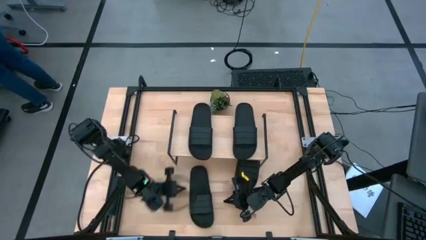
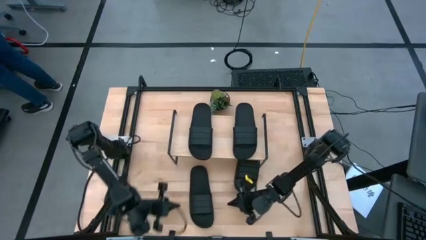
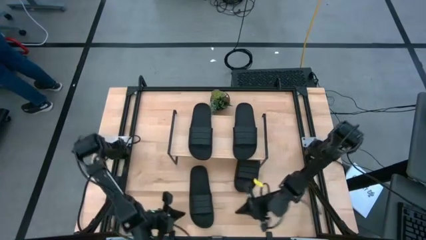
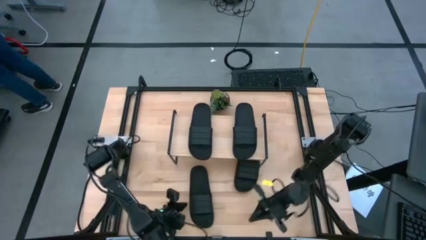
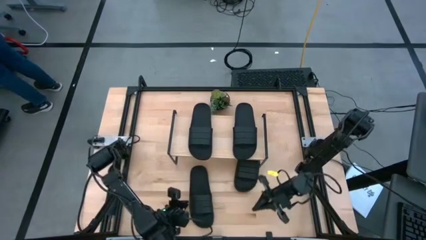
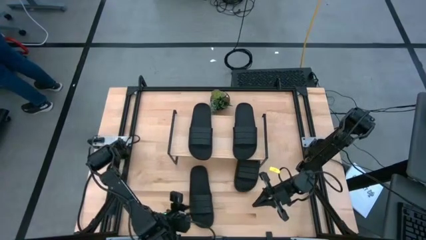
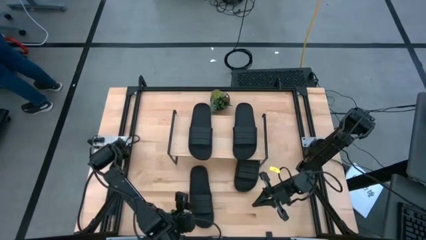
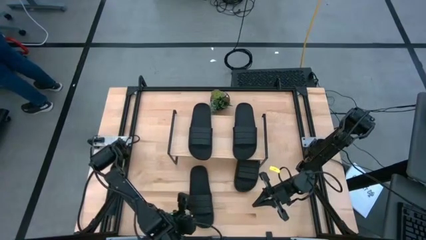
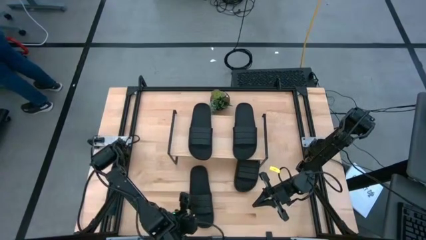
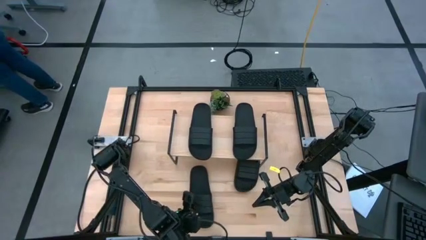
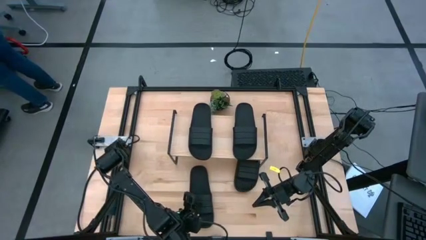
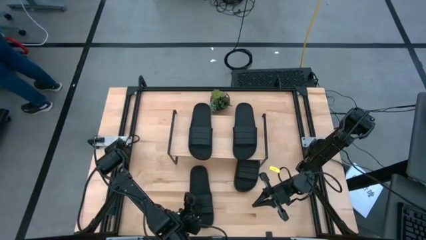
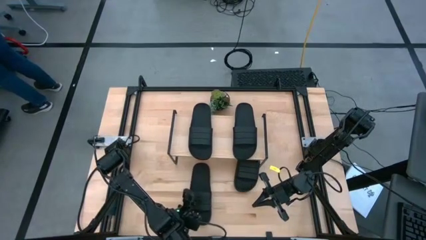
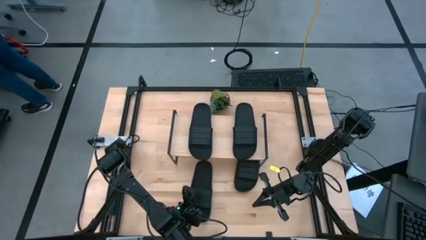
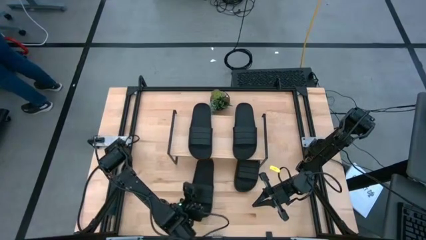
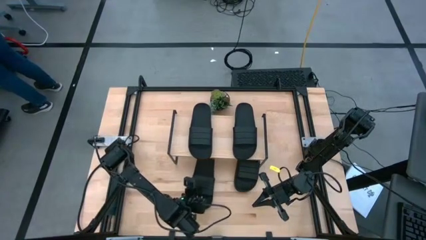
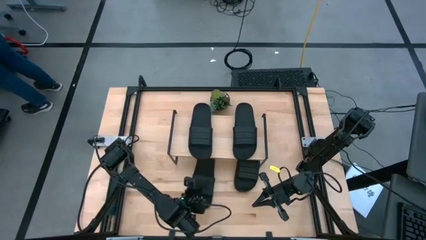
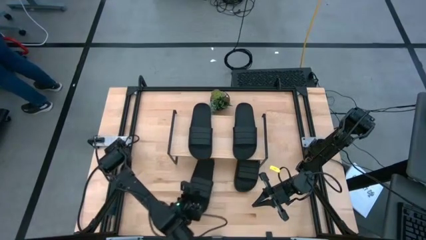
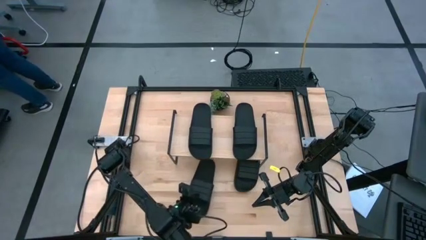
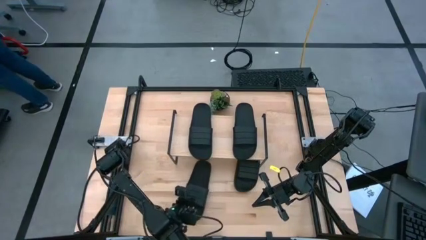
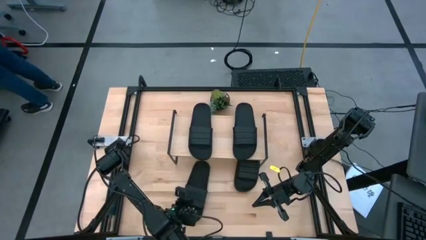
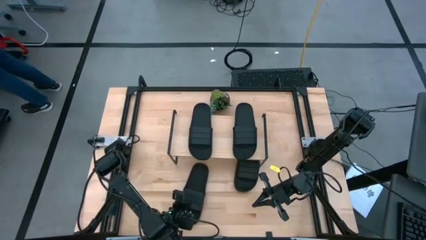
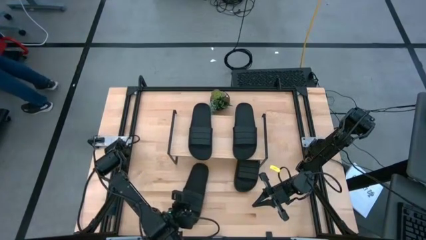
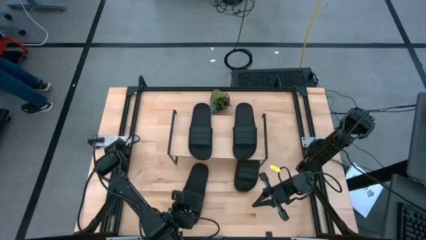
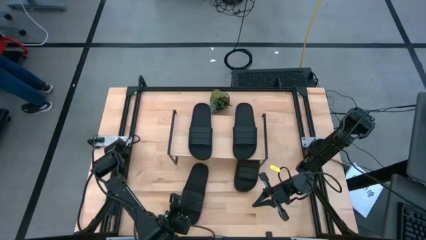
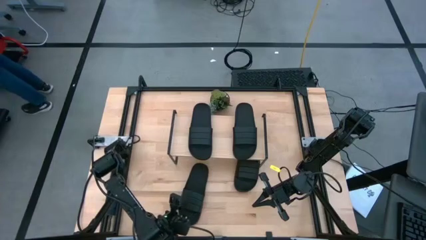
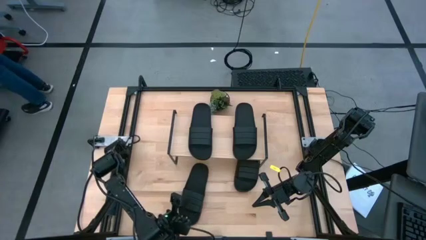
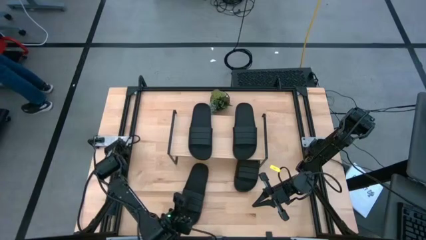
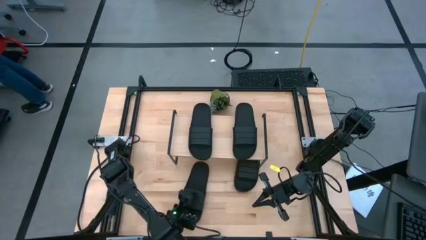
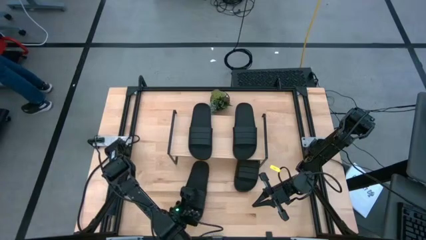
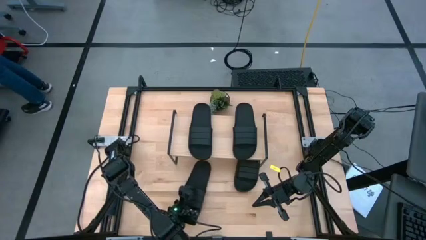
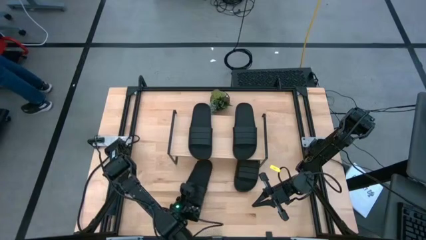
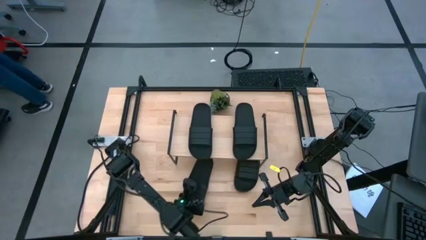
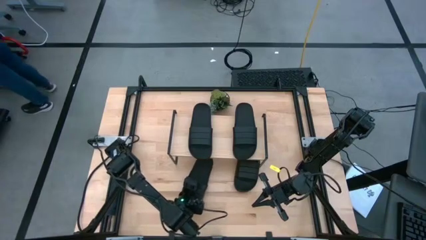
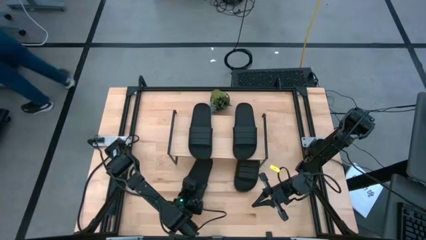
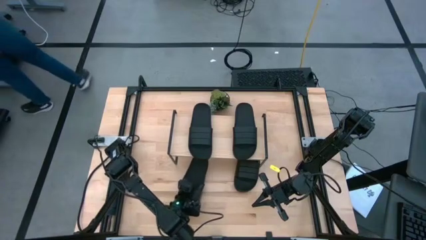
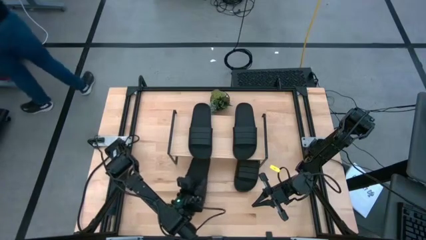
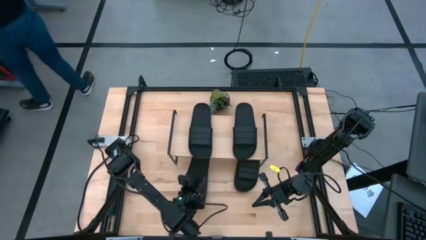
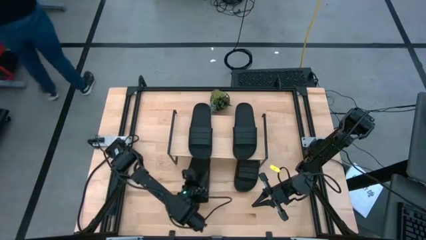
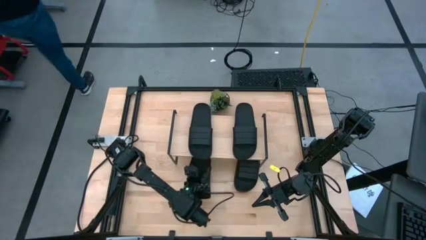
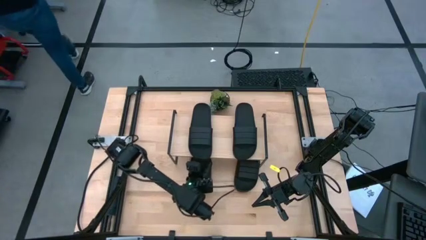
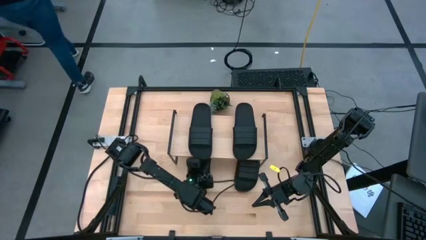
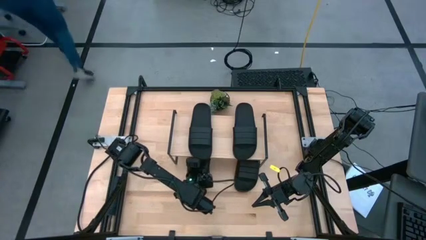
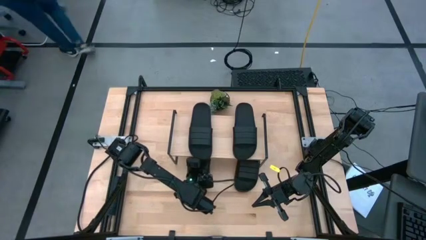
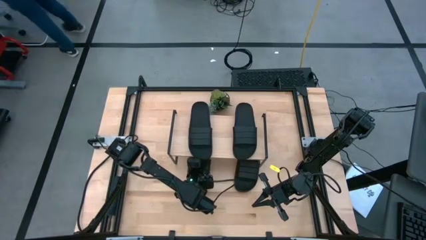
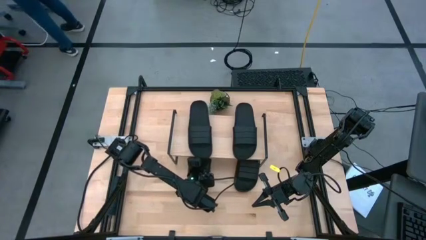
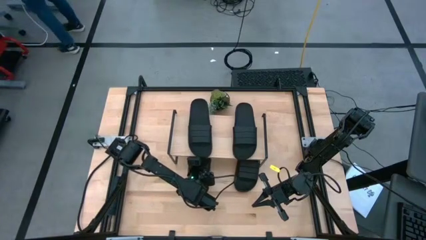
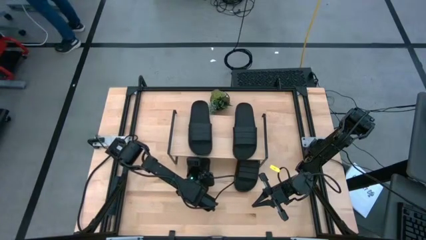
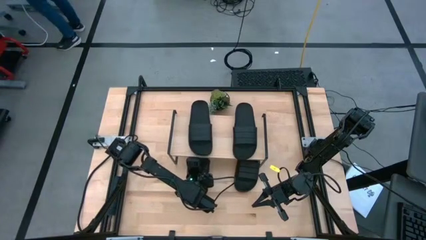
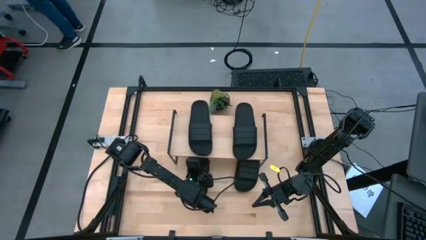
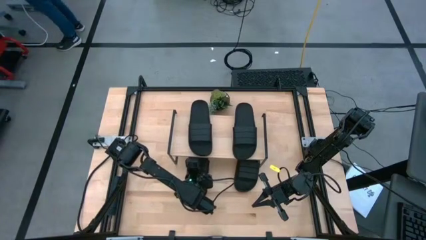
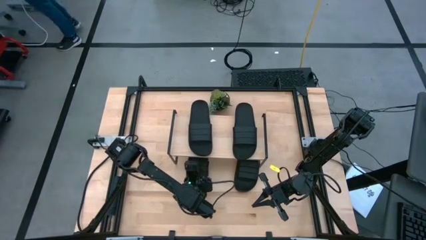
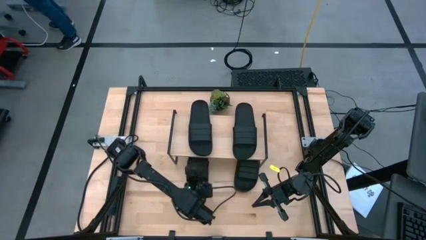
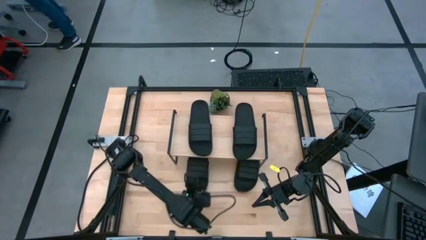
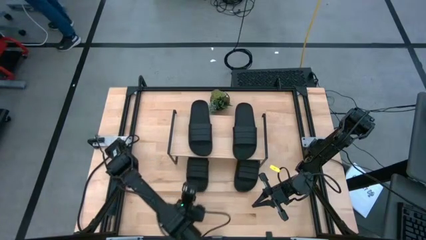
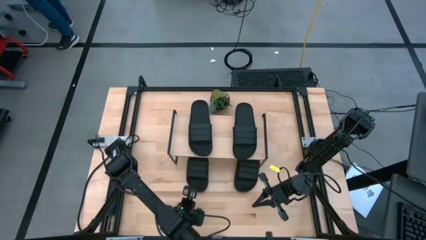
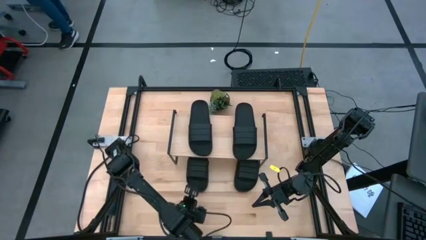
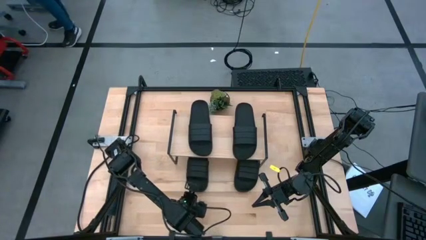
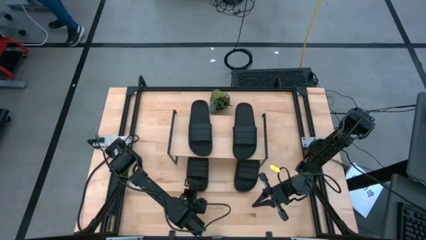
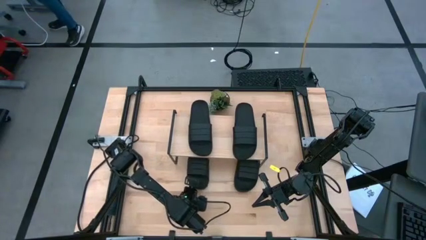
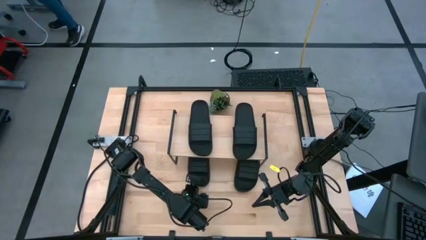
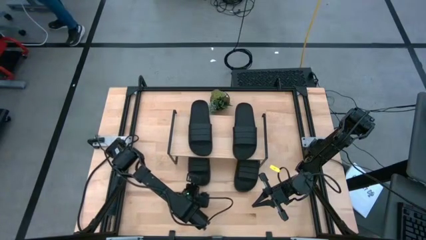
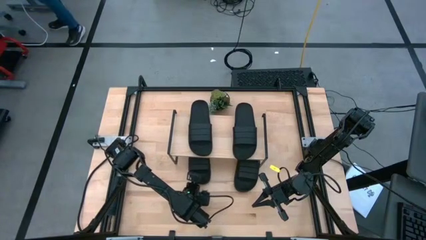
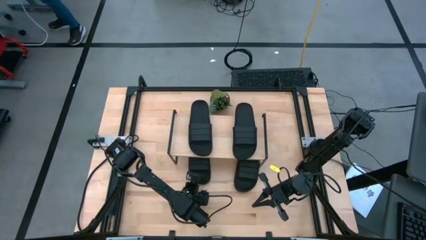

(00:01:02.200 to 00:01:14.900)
Task: Pick and place slides into the shelf
Put the black slide under the shelf

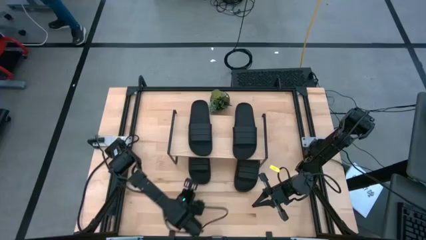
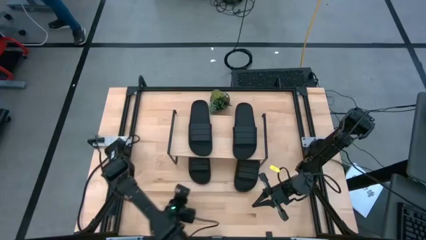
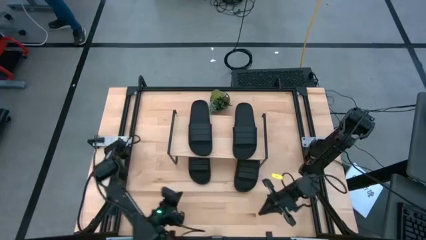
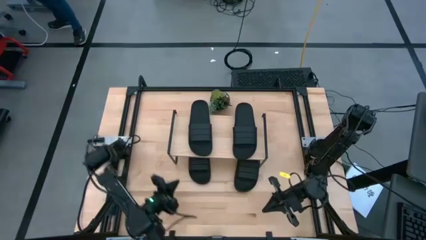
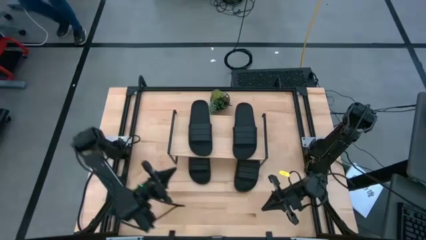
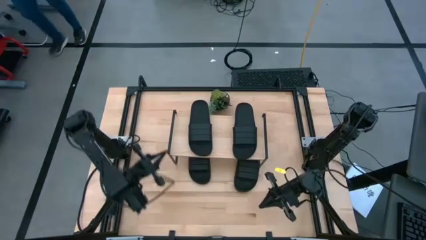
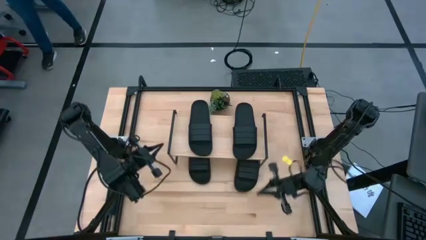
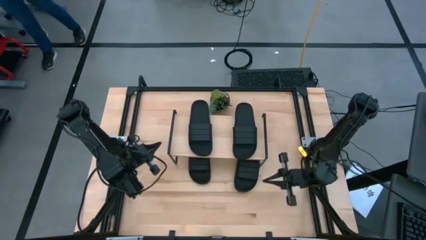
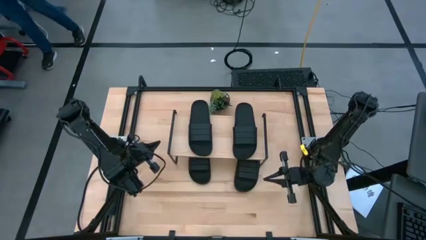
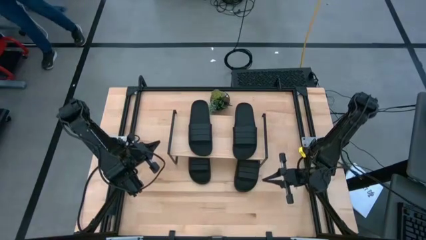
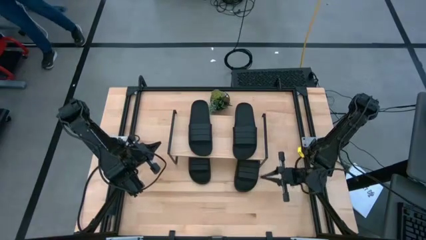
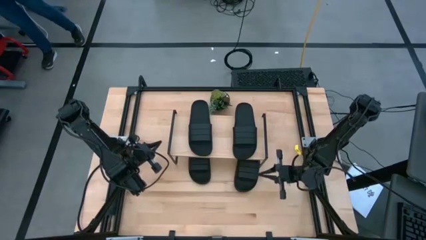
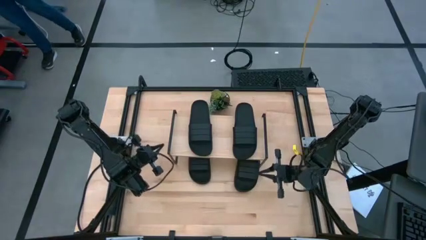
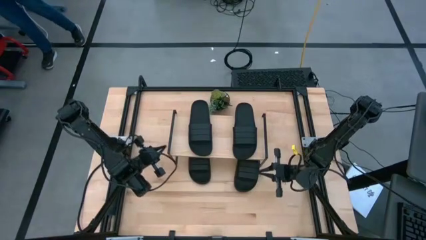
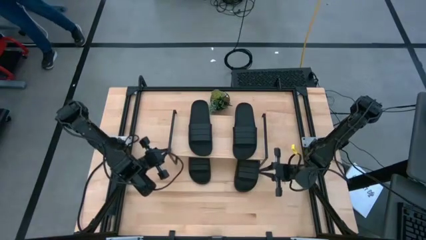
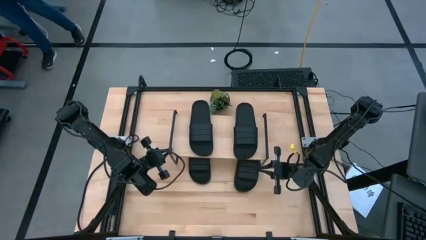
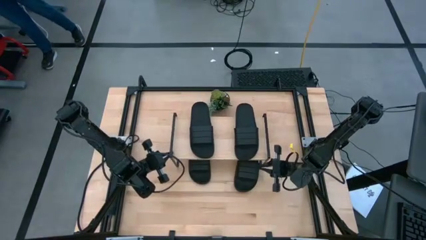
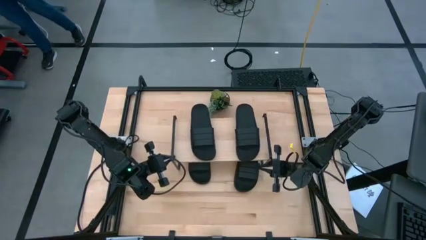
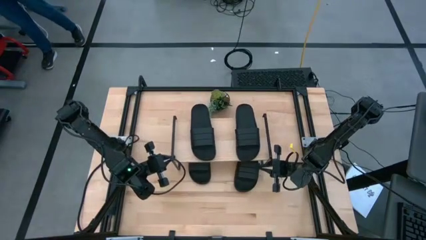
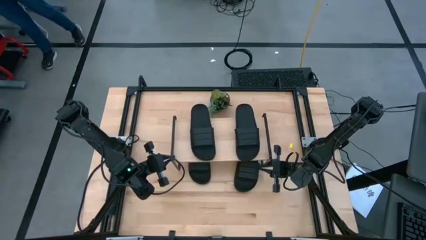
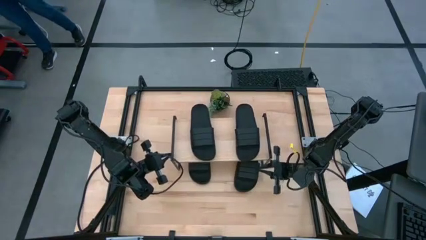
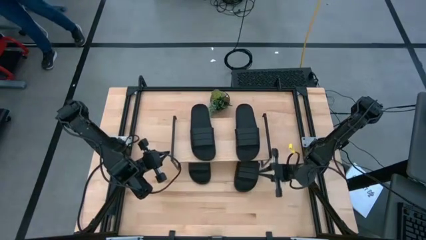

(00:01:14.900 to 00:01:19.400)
Adjust the shelf

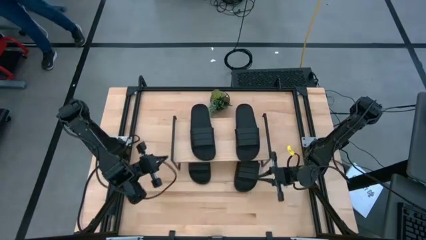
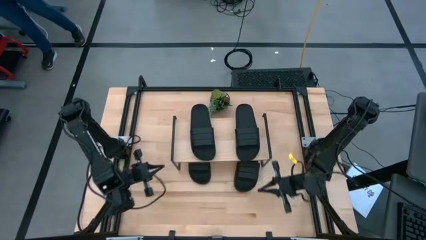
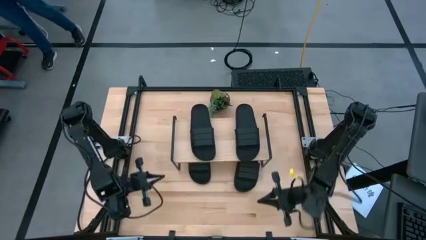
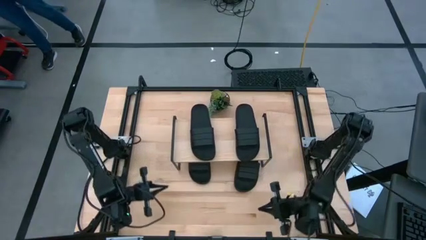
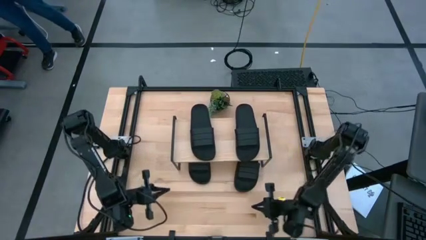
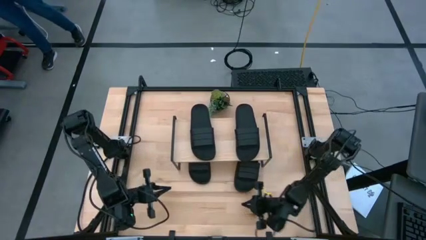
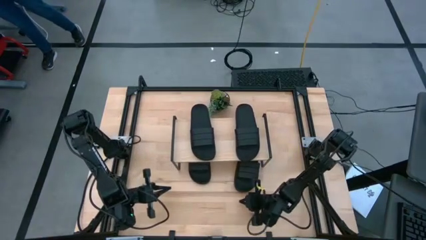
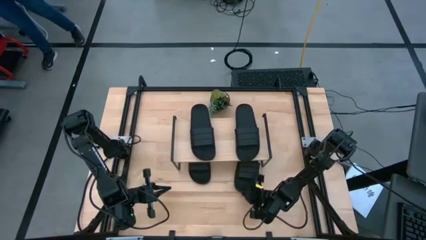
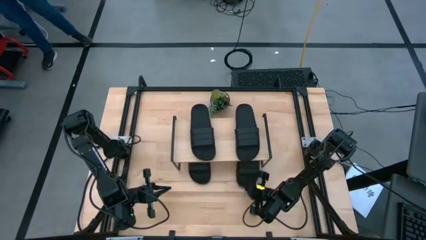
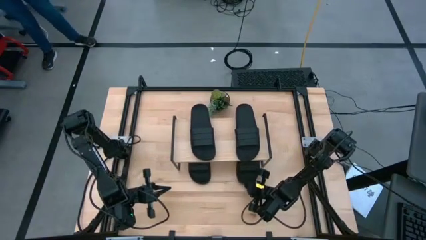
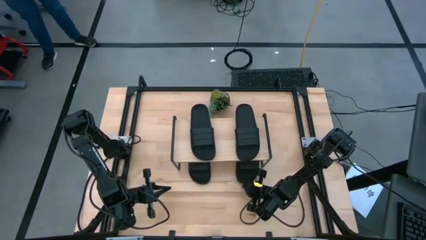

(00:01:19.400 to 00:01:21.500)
Adjust the black slide under the shelf
